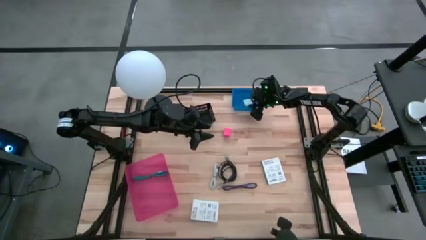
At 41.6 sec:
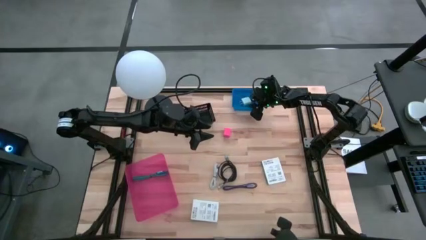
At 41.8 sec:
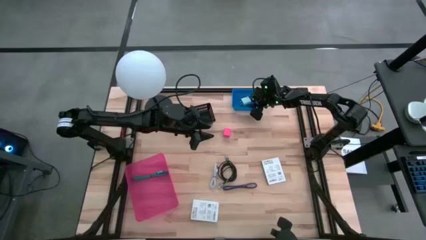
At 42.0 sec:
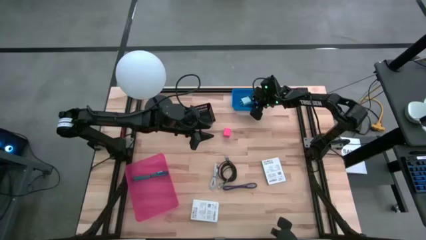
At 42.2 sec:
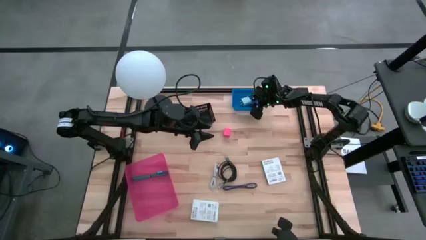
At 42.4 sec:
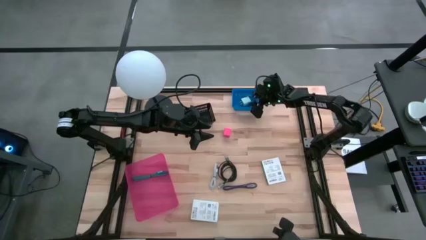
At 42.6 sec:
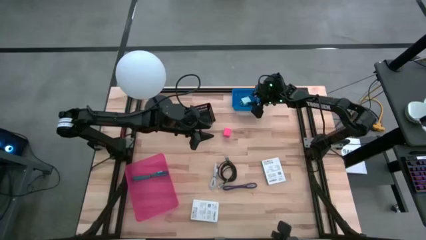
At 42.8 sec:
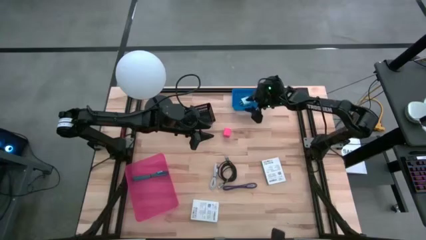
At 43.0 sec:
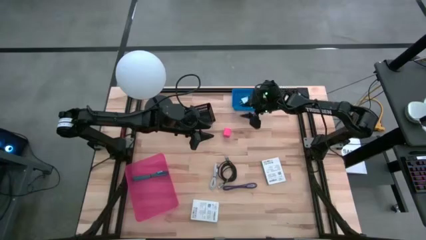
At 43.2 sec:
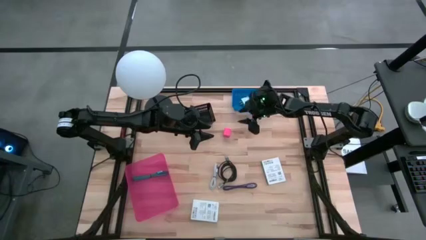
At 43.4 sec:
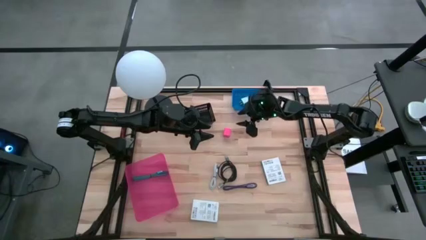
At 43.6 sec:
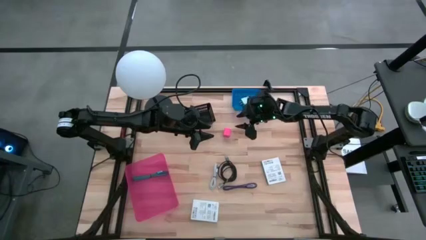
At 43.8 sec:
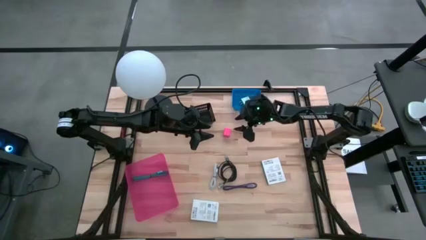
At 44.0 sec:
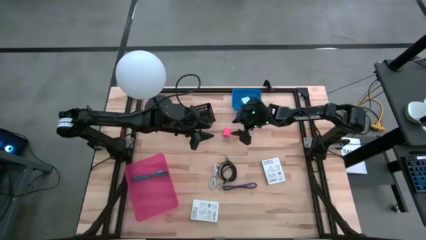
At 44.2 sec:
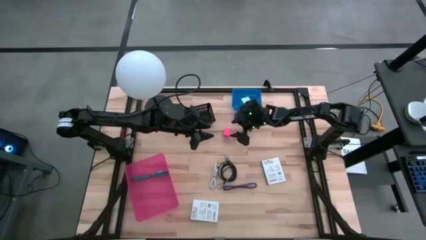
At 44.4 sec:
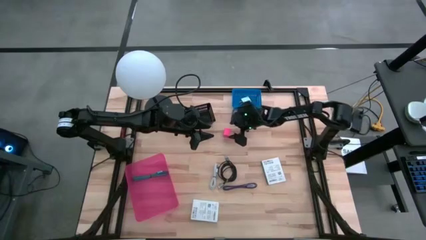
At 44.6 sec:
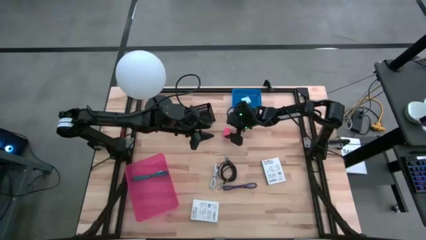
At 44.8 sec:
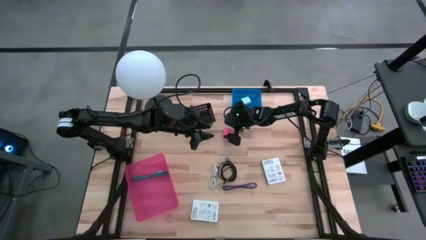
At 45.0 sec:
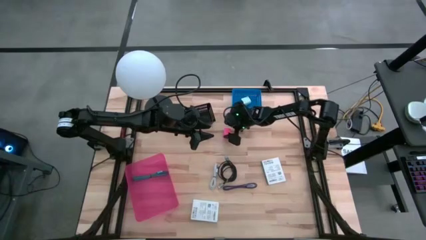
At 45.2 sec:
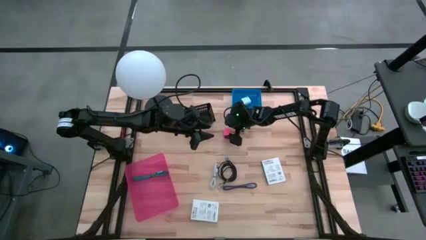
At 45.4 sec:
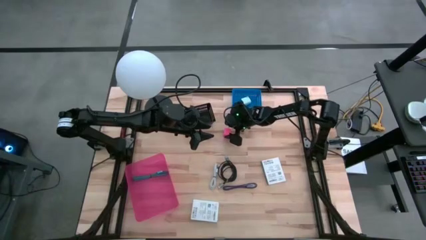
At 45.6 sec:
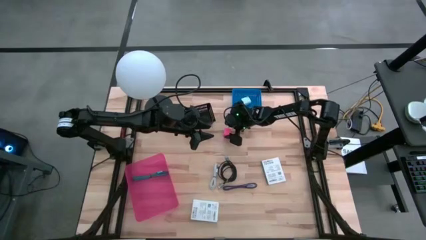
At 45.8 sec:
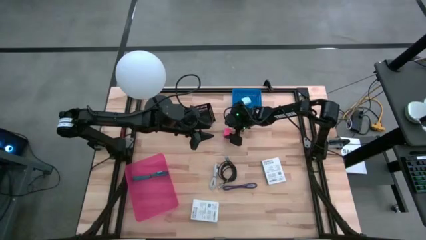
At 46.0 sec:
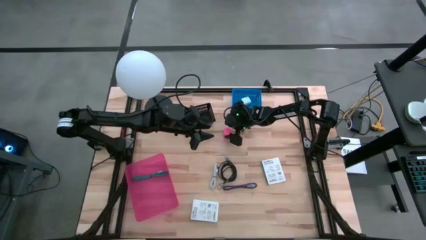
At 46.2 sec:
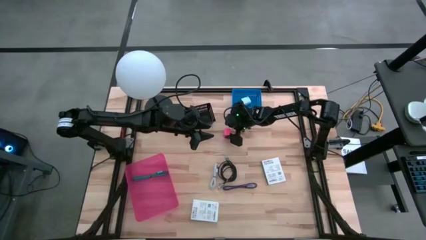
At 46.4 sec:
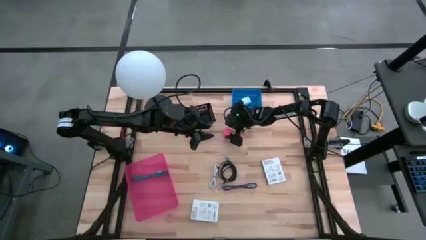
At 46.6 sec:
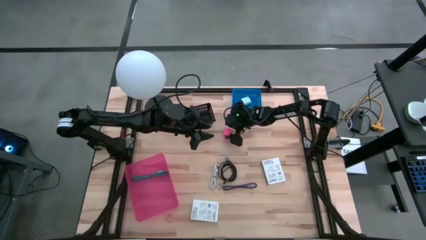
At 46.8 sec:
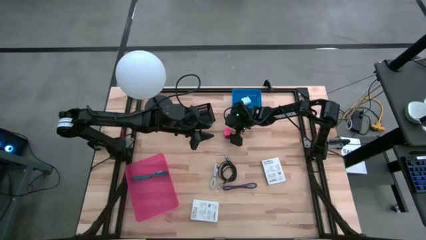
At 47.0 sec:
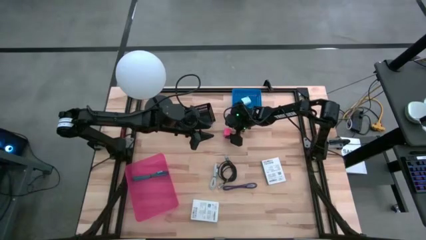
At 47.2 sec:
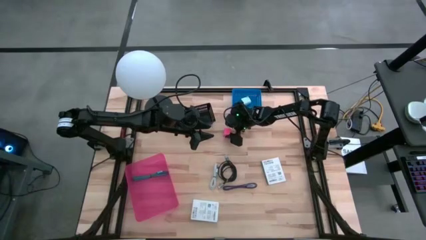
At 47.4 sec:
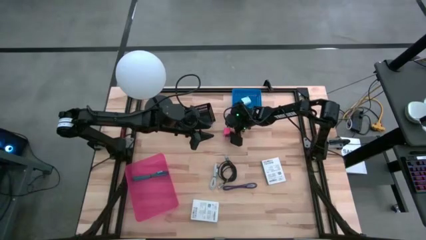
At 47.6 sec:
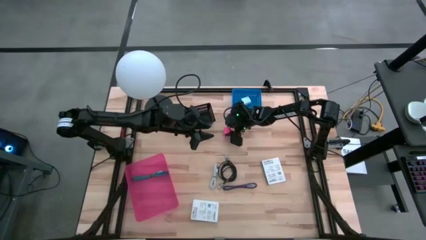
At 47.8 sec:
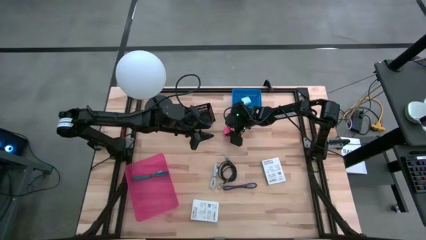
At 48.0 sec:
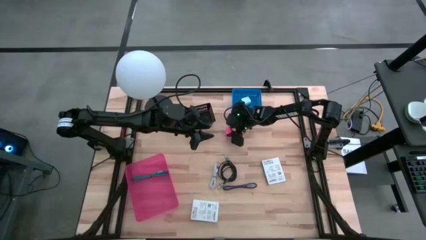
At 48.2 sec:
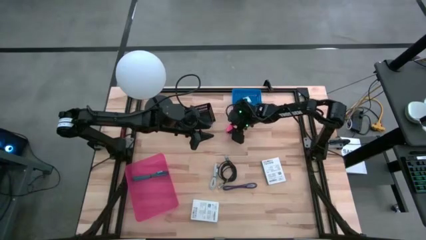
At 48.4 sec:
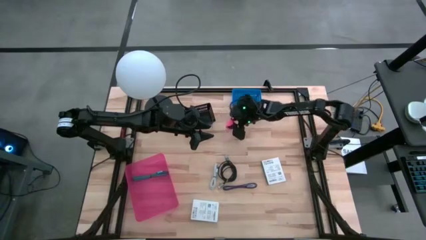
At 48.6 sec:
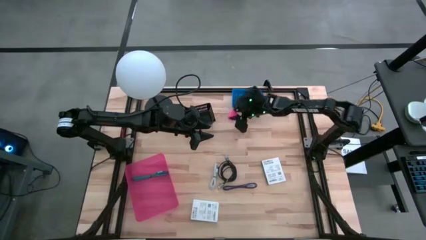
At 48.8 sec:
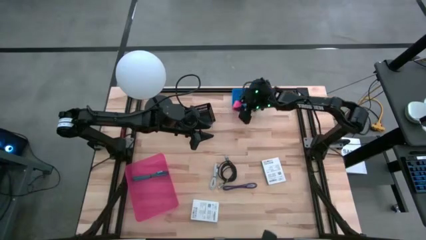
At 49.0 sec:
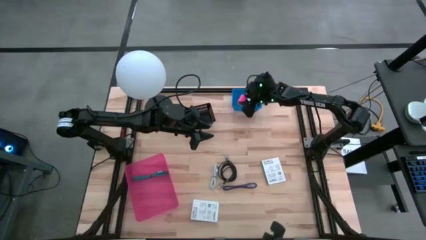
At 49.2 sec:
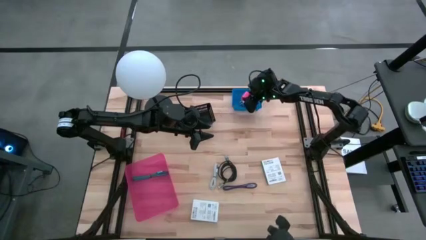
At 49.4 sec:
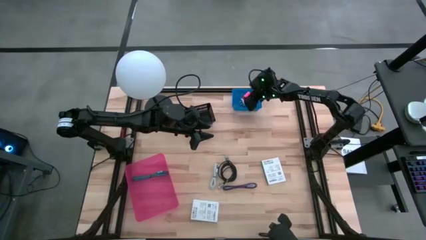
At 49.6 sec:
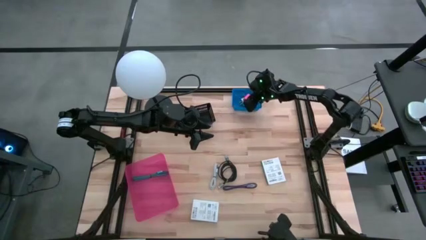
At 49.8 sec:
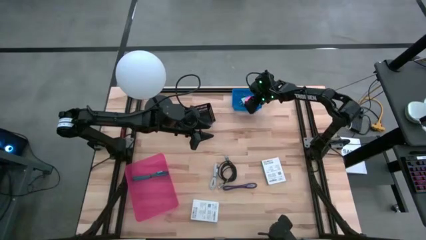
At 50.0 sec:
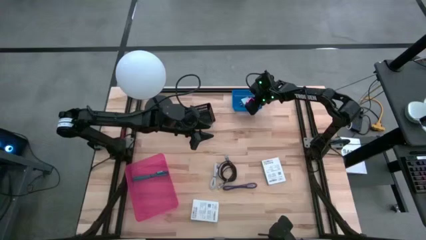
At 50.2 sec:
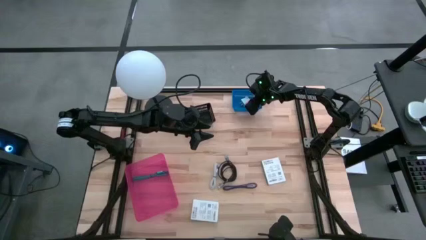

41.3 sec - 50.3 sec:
Task: Pick and place items into bin
Put the pink charger adapter into the blue bin

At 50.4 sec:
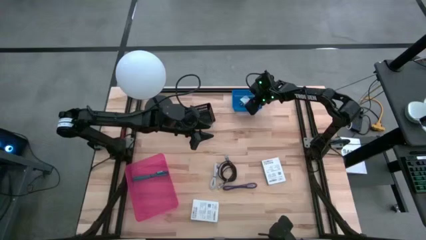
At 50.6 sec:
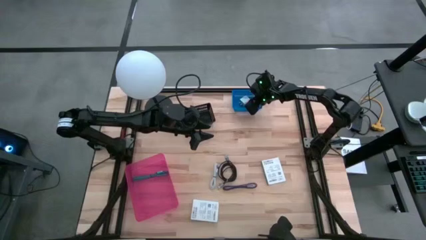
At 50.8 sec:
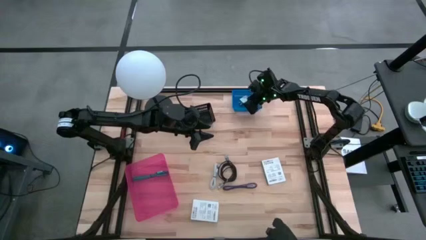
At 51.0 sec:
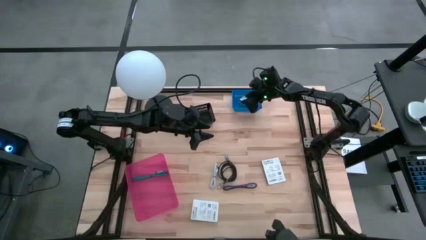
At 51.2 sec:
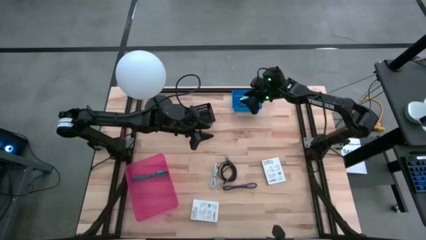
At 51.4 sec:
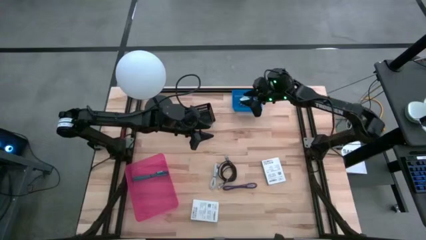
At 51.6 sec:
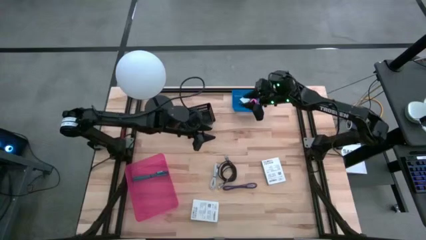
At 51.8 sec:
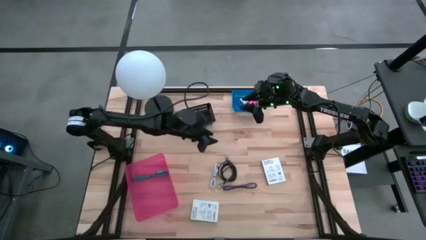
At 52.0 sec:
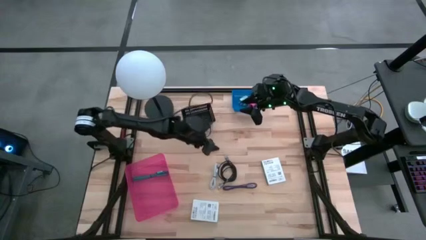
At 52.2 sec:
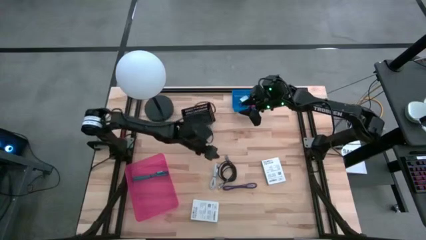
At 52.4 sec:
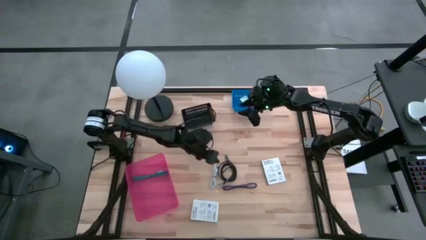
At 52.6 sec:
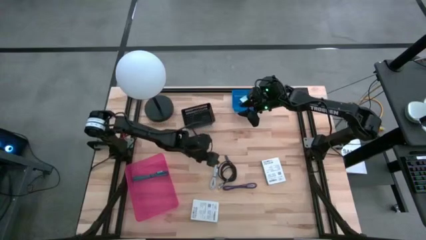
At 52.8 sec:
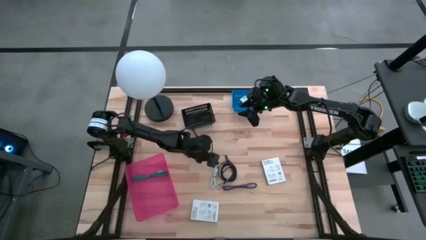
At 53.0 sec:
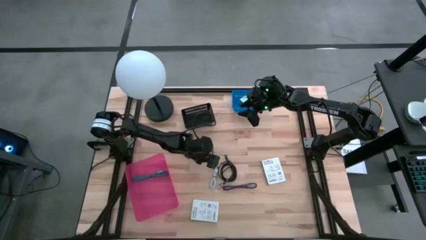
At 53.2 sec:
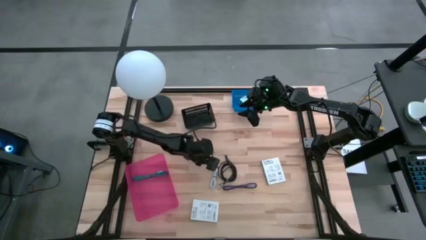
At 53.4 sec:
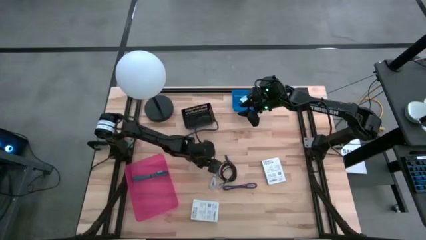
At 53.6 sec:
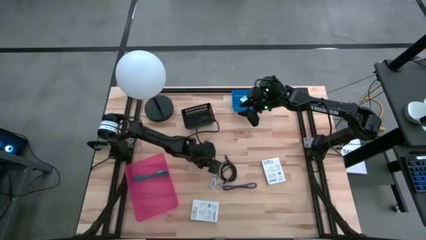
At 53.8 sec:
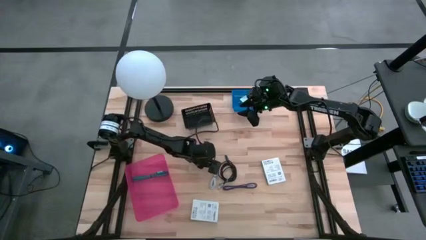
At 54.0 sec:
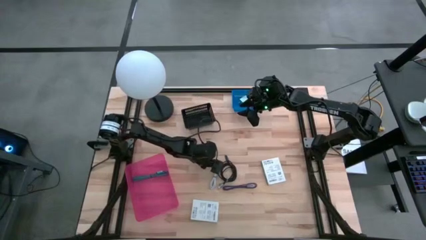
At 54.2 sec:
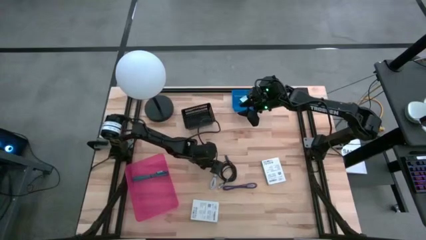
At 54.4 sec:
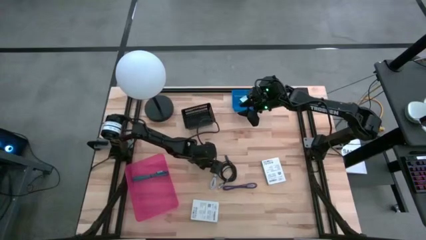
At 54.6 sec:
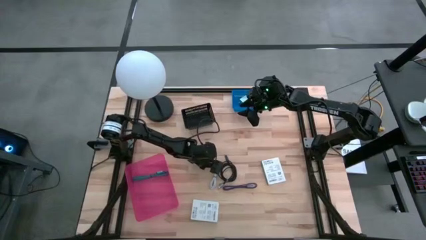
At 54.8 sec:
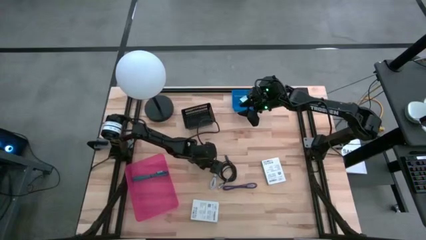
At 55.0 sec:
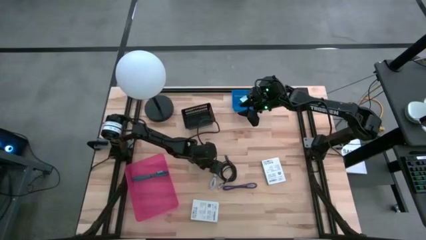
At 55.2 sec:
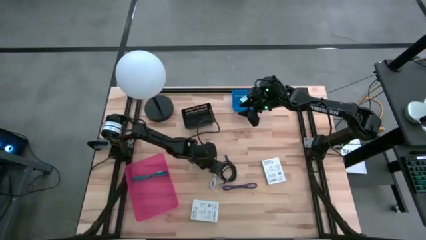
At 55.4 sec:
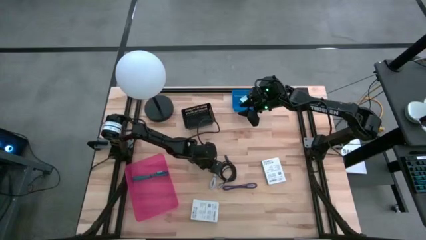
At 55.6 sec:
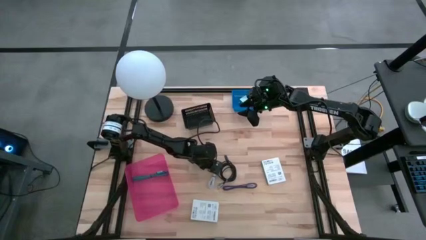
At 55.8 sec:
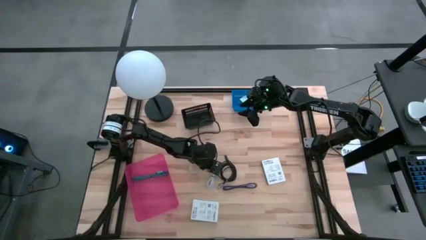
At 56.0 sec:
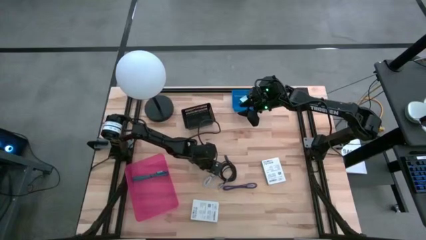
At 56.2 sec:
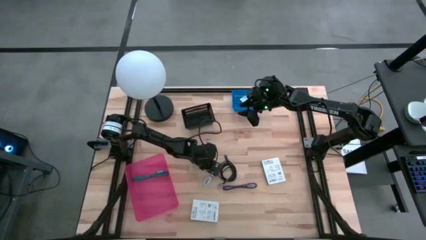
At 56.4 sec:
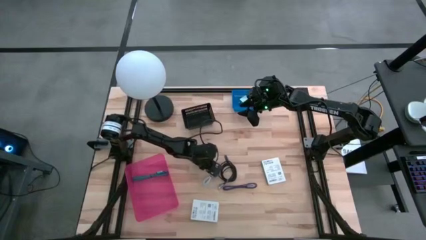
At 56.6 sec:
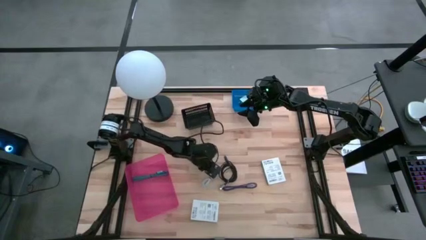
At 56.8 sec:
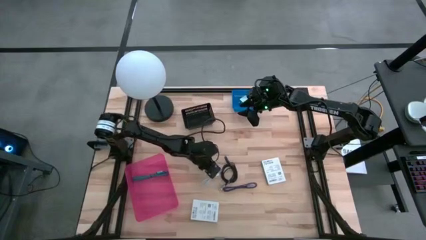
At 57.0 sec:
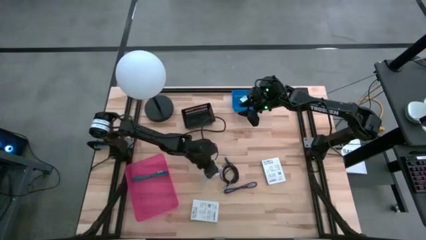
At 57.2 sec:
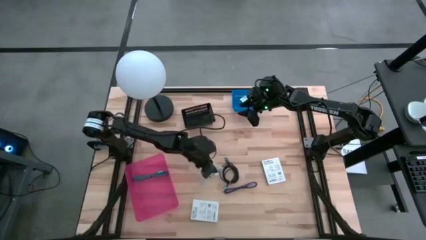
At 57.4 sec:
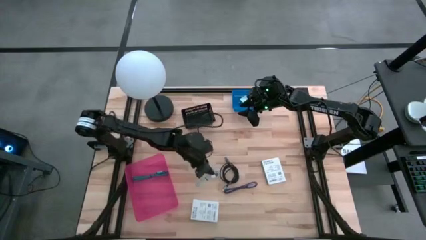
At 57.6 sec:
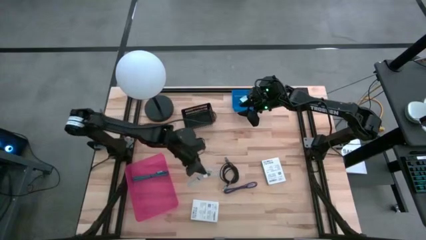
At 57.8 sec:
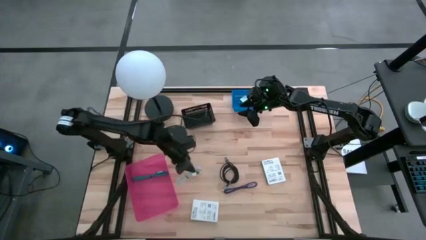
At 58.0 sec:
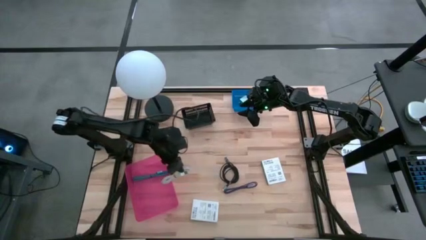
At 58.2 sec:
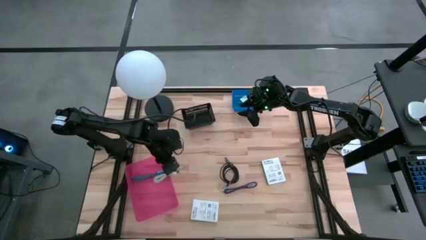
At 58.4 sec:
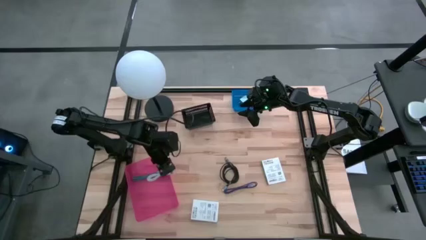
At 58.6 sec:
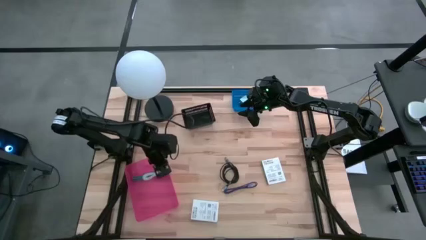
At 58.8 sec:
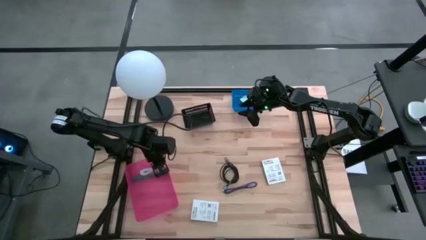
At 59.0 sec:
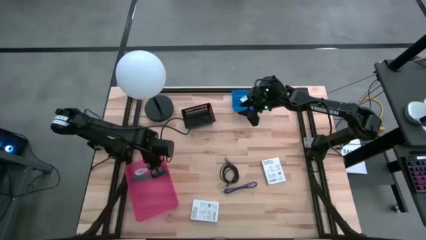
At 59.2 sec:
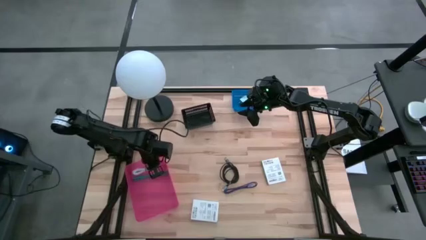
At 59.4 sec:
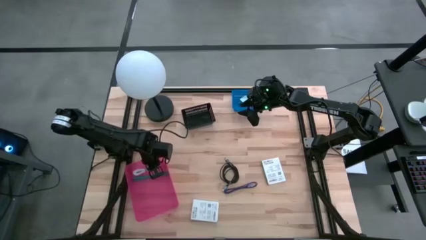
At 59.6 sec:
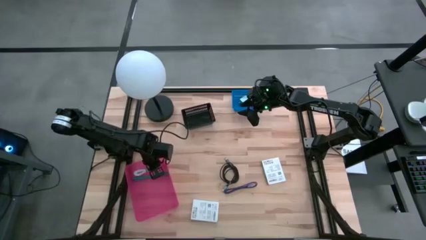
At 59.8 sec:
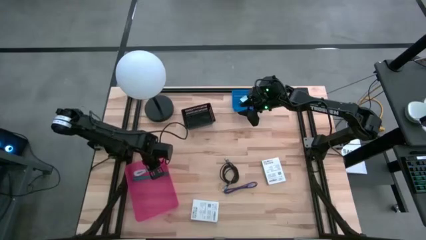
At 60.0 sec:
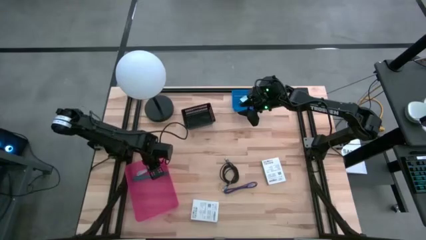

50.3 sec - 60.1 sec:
Put the white charger cable into the light pink bin
